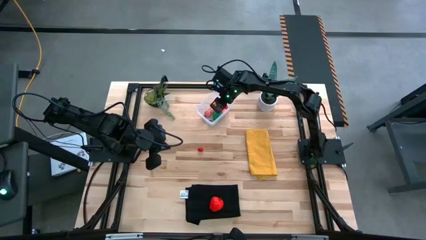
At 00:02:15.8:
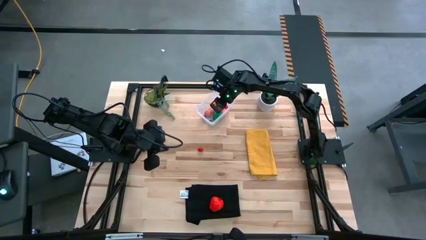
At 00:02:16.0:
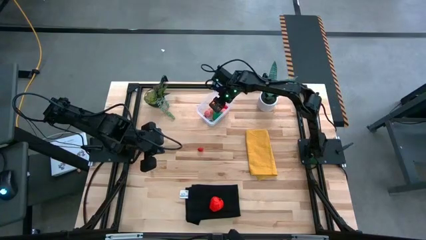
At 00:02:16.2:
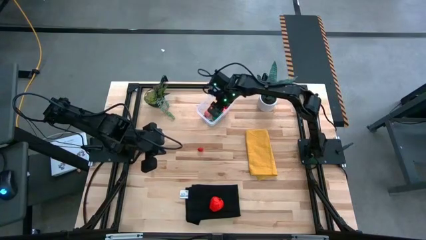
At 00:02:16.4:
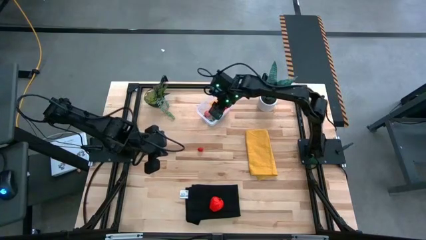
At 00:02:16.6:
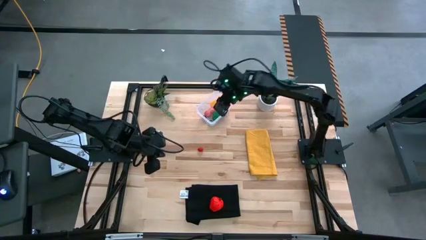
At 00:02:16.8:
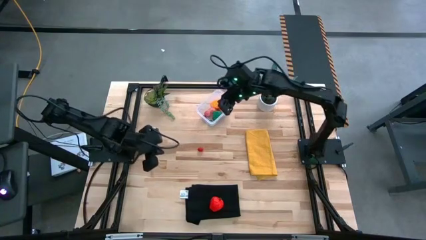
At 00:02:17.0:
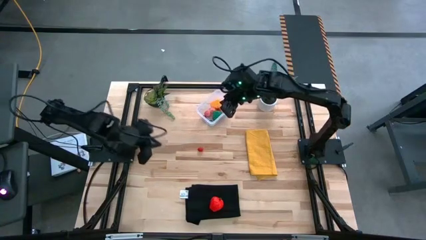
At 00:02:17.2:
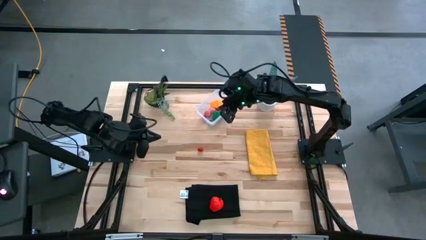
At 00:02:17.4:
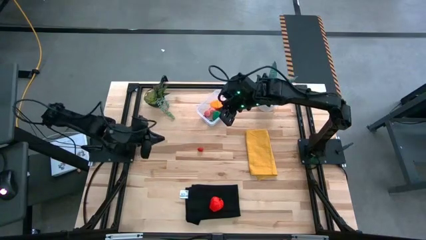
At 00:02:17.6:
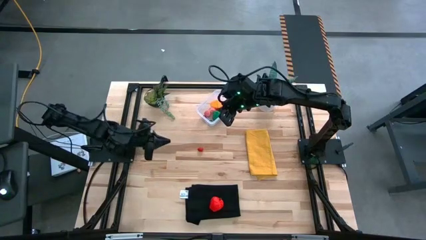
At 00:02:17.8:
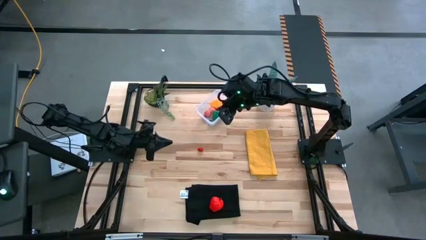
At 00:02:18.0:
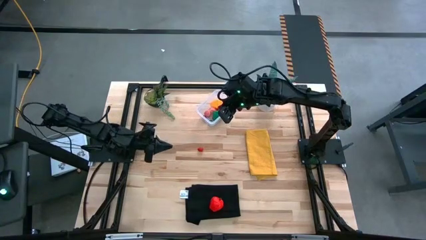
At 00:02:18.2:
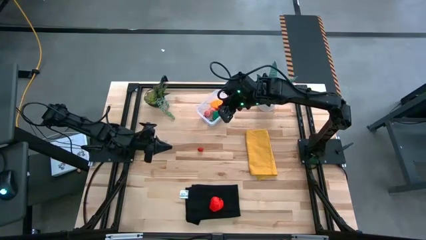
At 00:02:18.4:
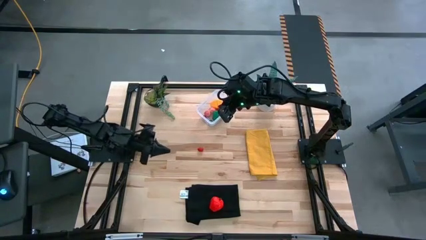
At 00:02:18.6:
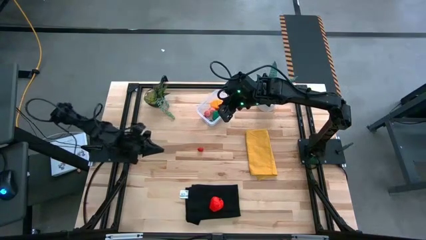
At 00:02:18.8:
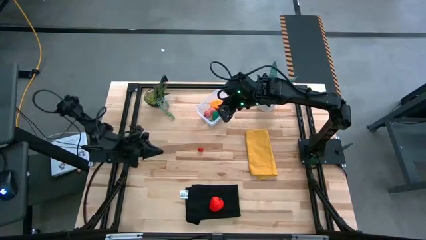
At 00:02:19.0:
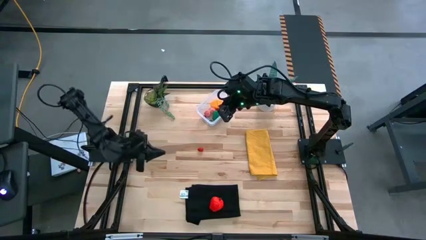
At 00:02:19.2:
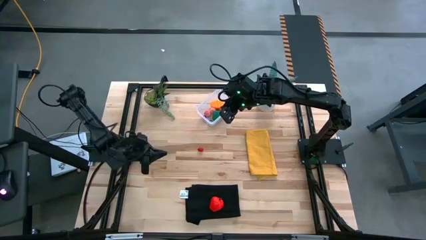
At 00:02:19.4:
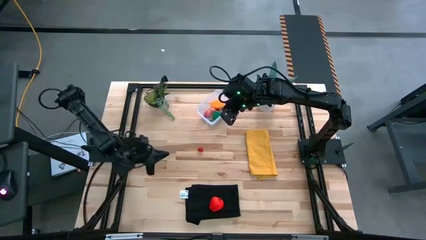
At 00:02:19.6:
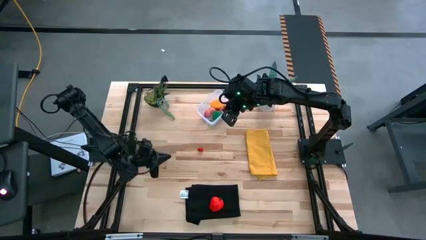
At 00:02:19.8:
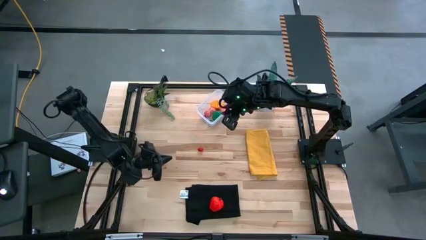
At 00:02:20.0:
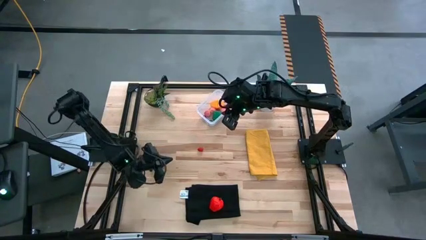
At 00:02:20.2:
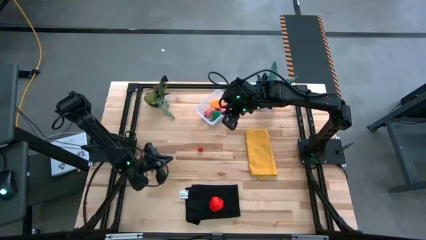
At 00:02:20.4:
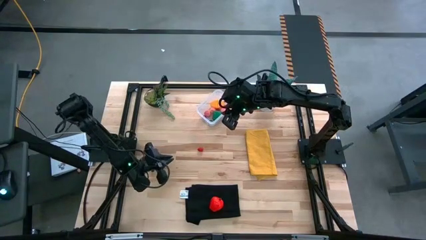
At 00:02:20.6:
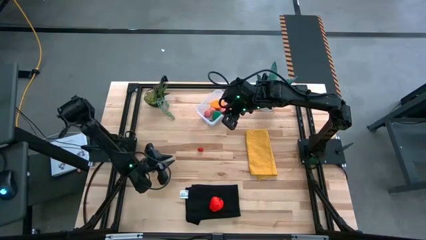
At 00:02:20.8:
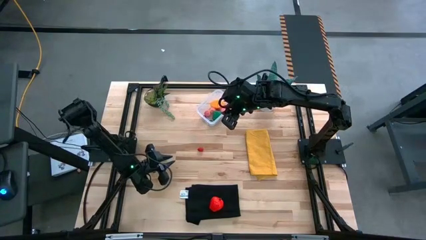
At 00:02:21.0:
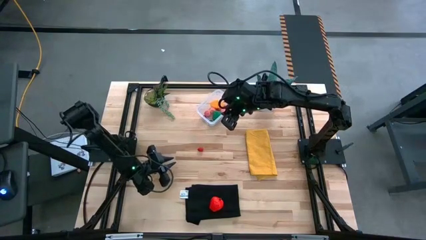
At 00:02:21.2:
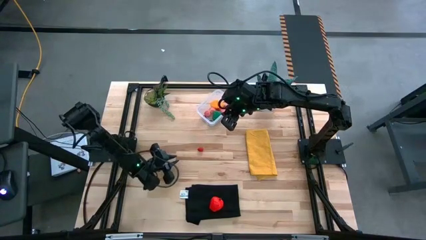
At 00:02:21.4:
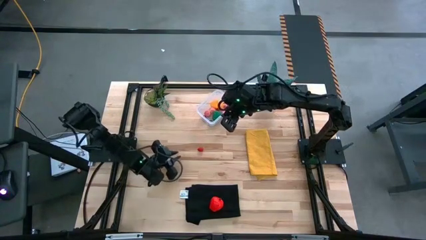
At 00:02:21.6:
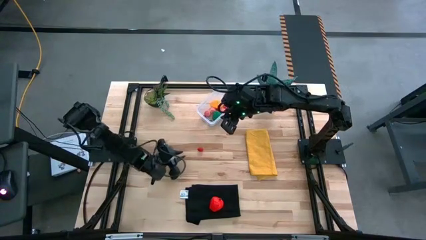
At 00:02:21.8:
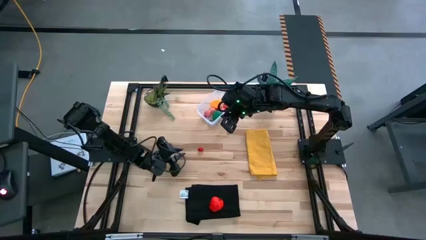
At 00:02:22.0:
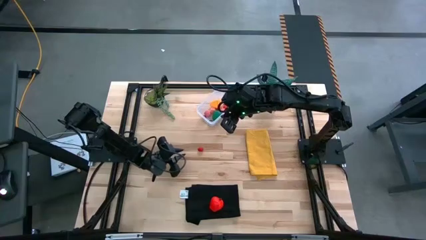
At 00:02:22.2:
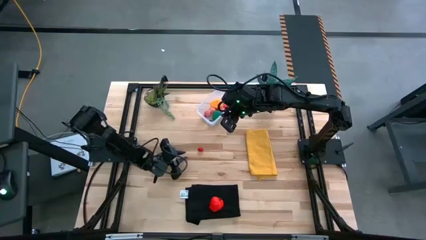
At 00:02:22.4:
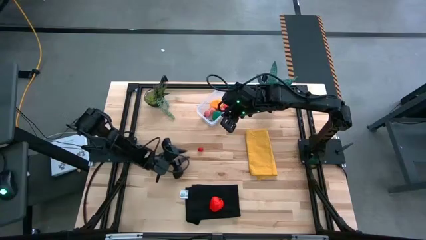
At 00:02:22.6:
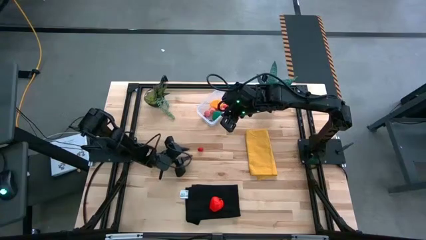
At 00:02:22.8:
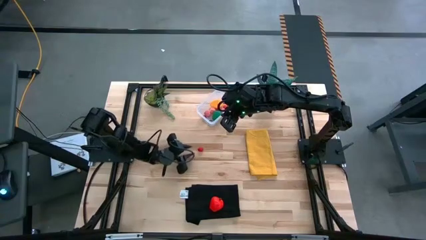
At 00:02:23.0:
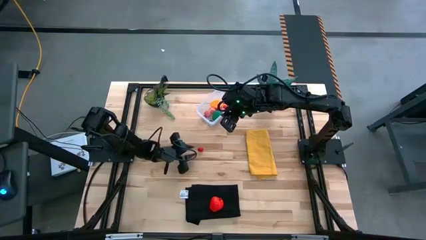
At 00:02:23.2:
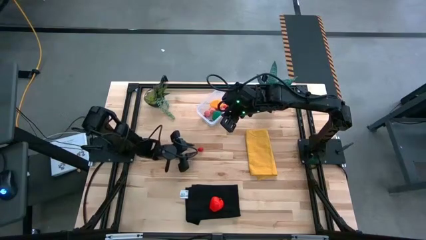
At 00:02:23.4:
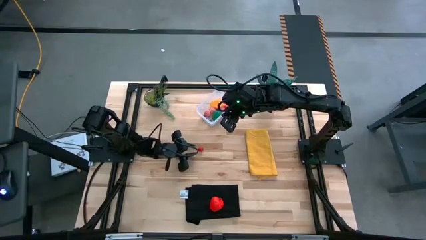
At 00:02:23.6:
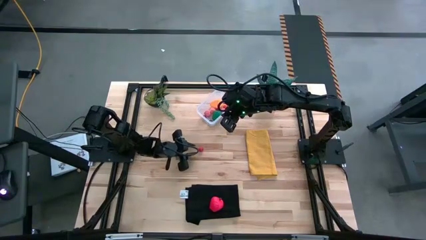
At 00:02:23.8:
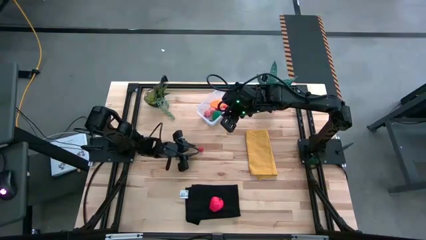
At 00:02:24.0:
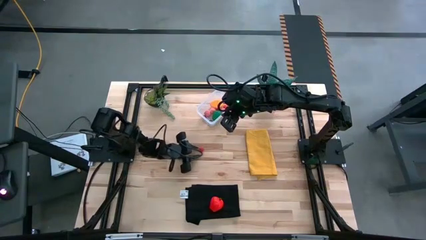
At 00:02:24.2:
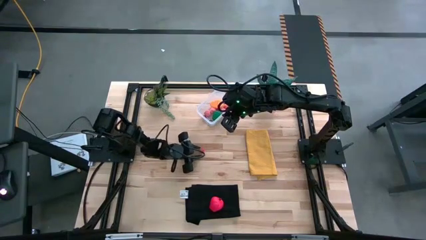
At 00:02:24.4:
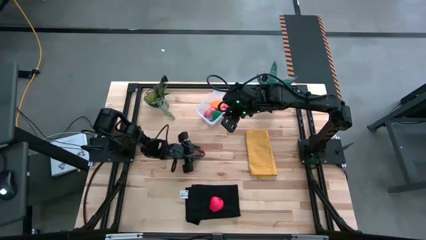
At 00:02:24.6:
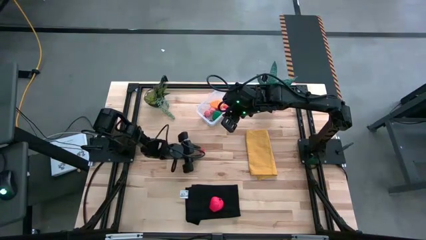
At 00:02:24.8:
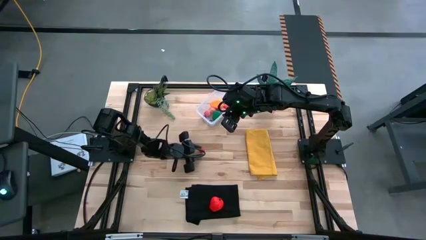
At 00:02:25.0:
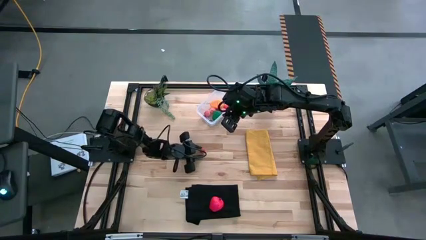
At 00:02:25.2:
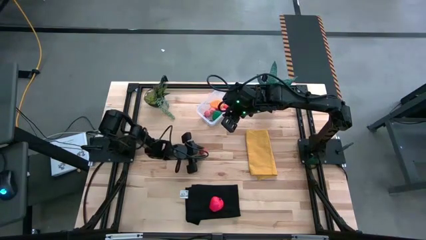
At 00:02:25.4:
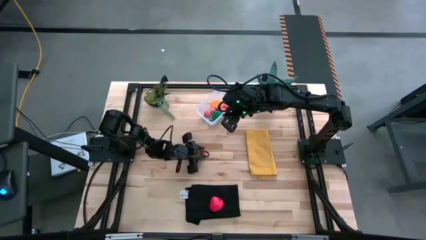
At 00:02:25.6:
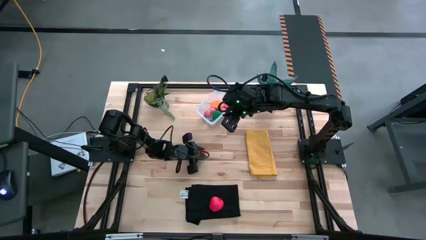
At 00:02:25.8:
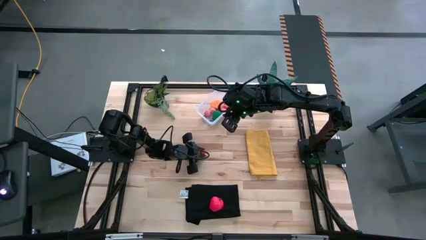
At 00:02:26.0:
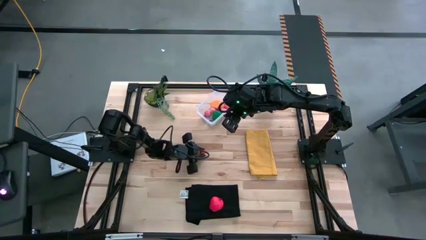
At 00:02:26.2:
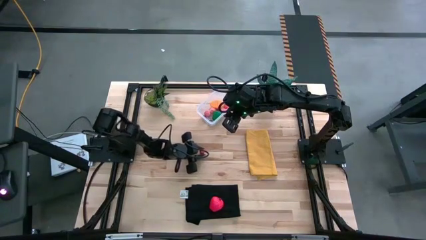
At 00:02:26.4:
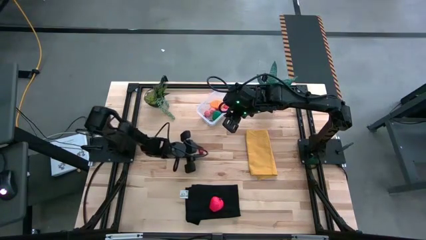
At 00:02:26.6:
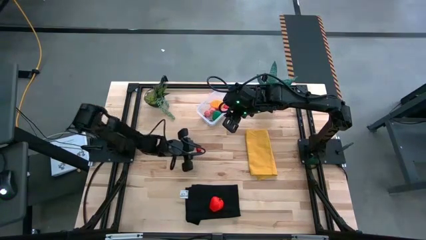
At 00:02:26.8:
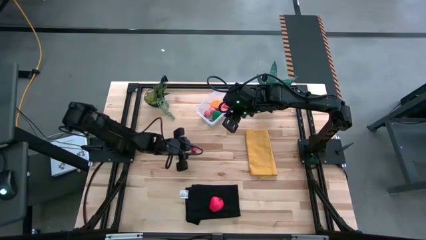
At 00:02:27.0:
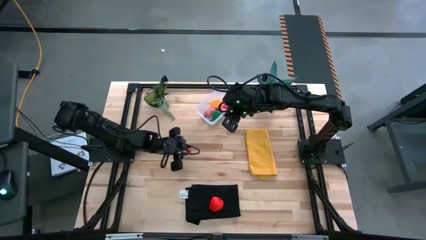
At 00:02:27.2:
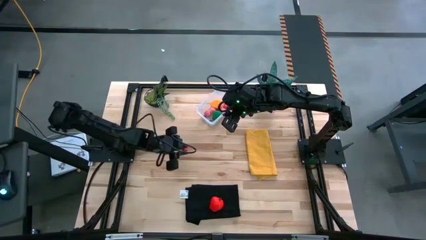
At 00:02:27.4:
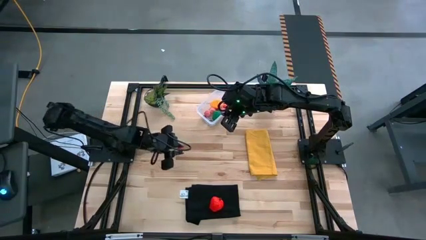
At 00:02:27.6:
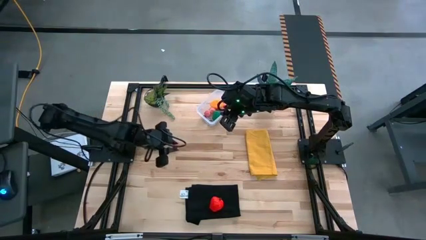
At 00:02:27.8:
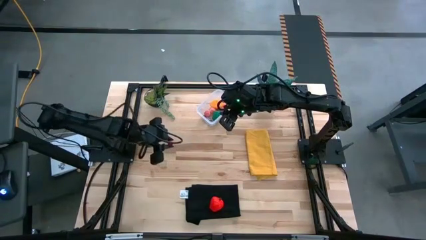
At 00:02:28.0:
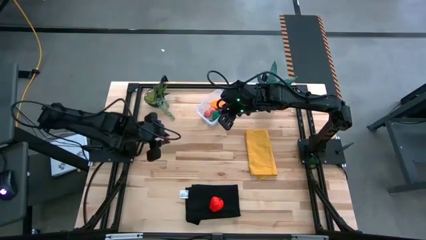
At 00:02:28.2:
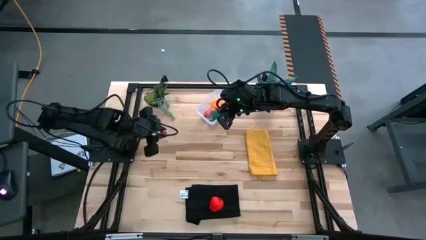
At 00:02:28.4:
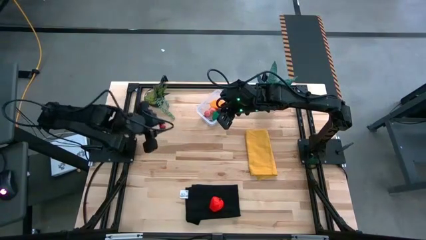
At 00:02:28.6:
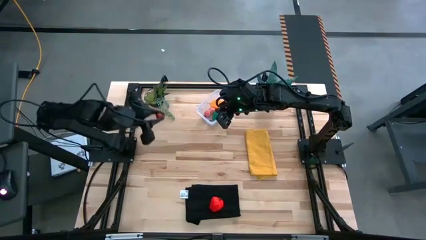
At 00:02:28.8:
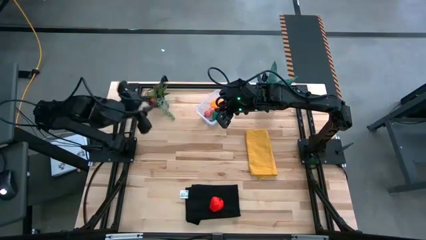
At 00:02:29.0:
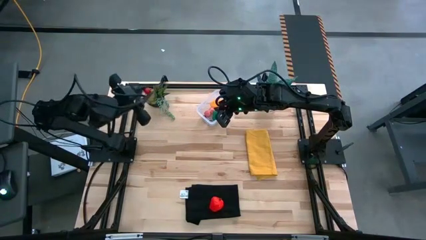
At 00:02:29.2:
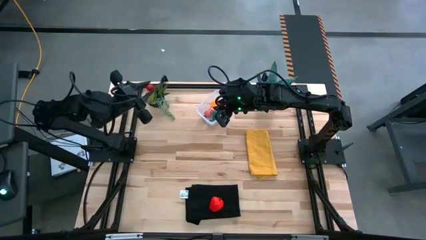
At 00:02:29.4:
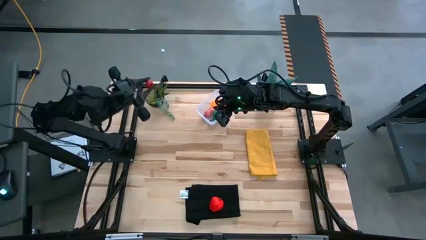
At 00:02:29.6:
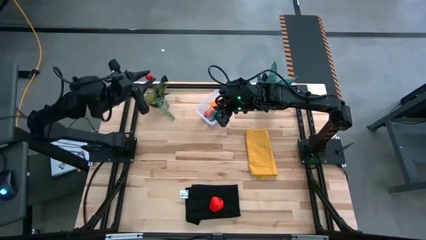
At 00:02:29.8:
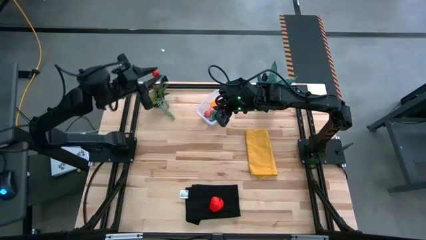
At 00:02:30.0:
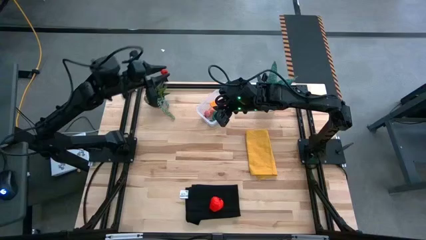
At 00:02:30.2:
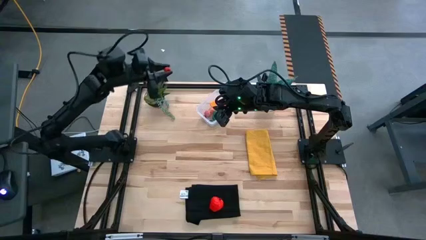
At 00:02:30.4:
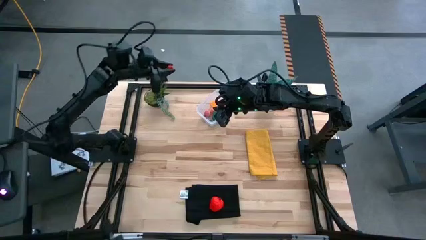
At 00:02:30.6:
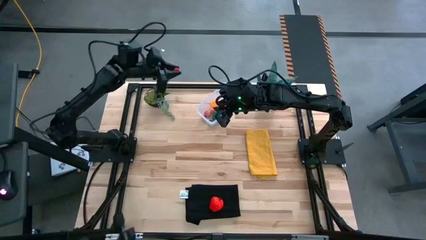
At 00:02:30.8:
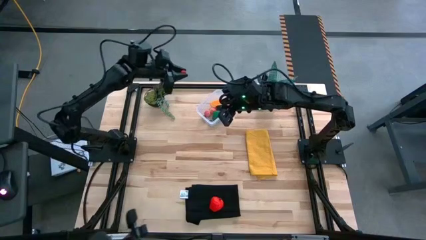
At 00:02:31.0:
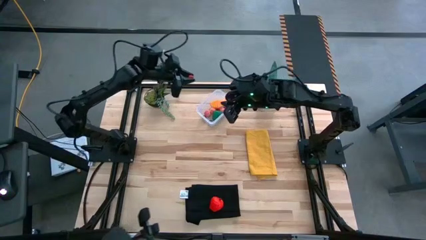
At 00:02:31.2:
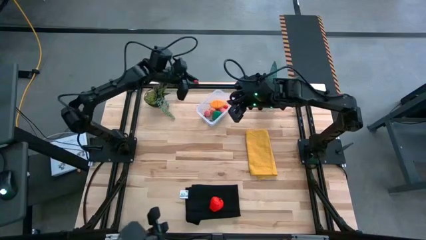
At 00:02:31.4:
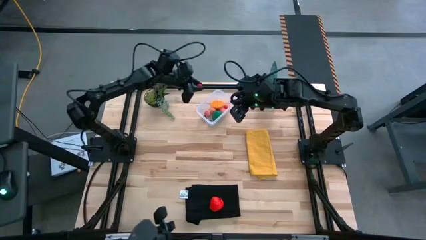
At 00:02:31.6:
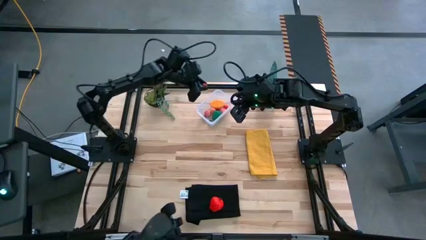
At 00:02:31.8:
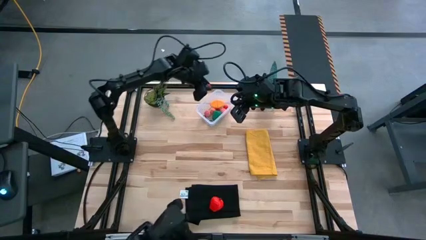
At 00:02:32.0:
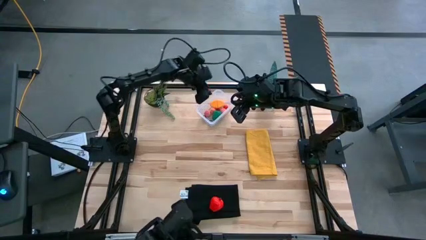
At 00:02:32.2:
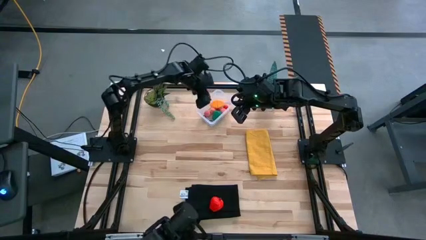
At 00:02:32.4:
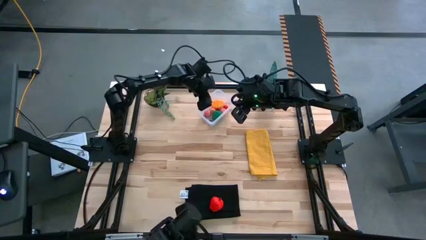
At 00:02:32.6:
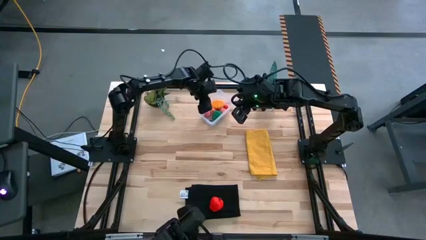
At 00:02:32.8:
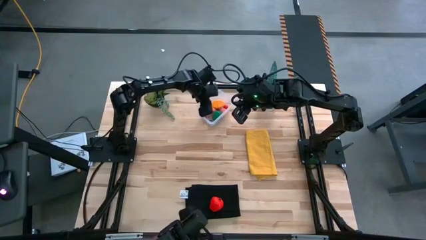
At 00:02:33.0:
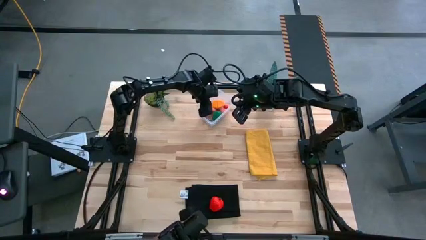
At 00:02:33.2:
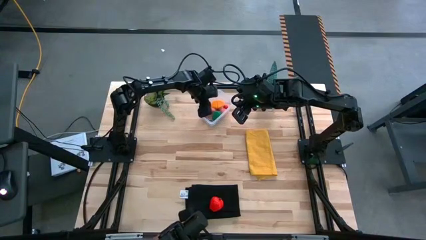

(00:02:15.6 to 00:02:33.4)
Task: Pick and placing Produce into tupperware
Put the red raspberry into the transparent bin
